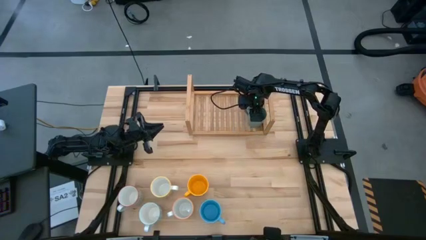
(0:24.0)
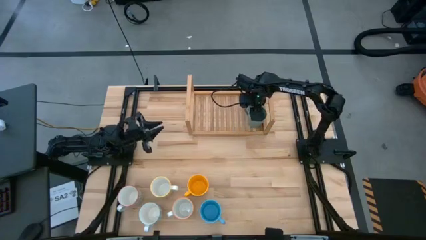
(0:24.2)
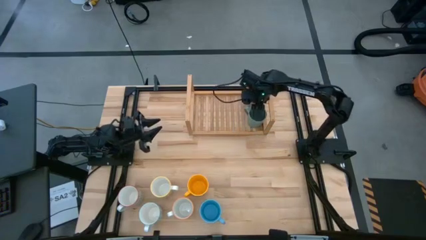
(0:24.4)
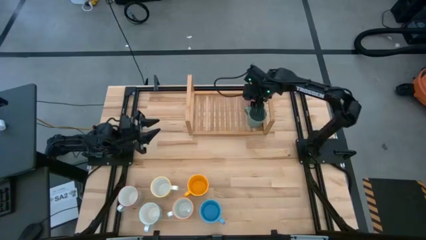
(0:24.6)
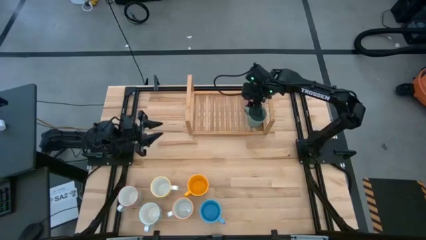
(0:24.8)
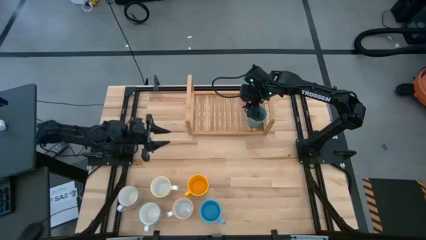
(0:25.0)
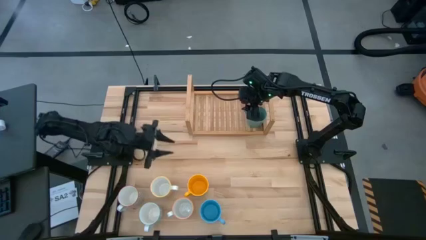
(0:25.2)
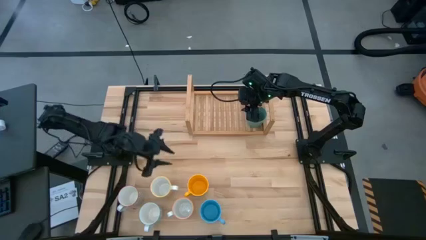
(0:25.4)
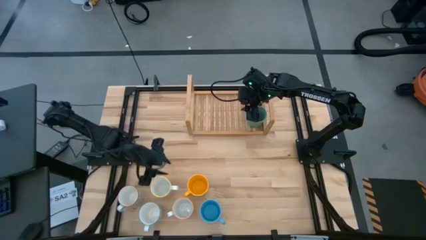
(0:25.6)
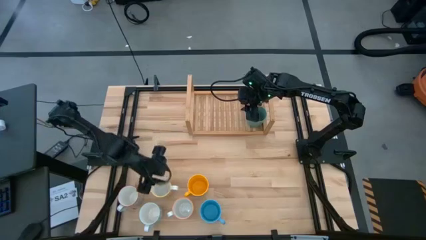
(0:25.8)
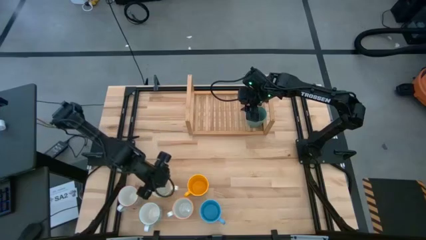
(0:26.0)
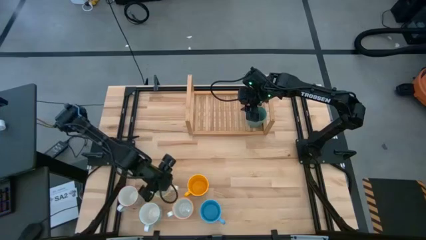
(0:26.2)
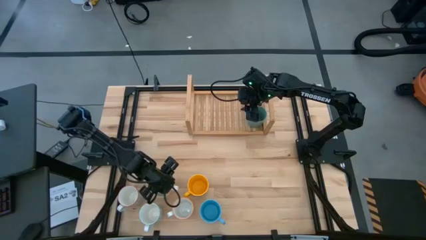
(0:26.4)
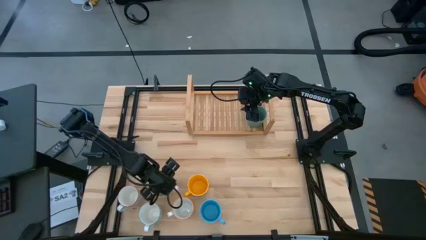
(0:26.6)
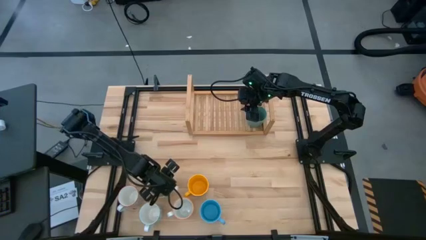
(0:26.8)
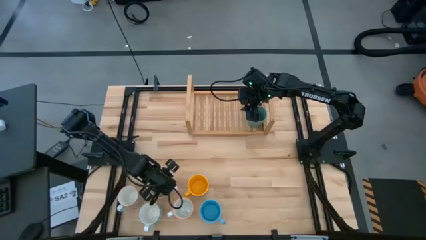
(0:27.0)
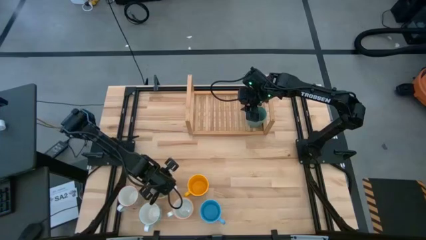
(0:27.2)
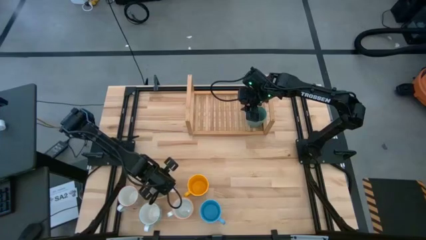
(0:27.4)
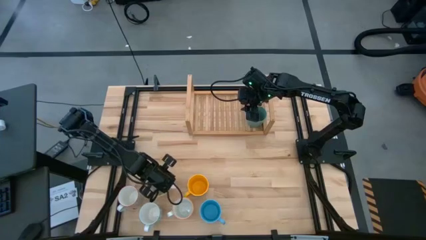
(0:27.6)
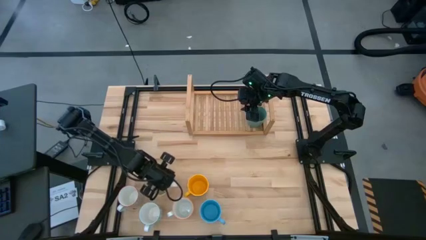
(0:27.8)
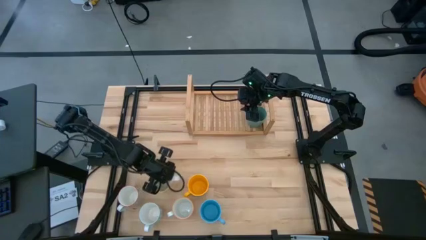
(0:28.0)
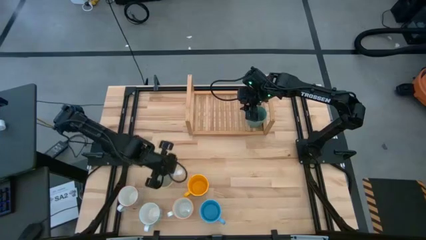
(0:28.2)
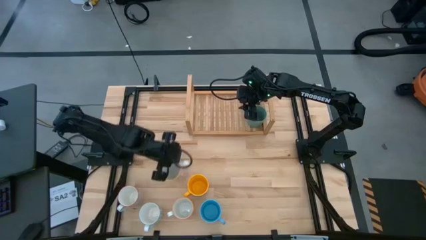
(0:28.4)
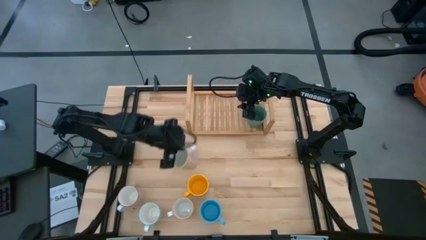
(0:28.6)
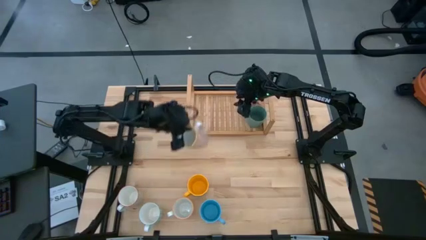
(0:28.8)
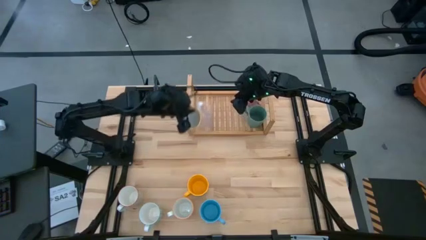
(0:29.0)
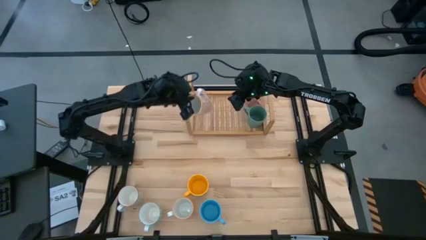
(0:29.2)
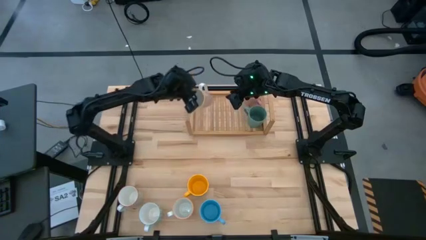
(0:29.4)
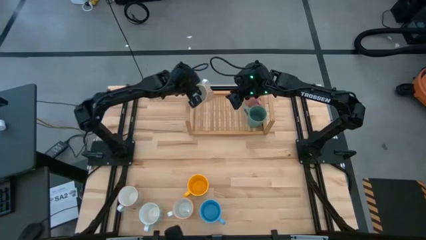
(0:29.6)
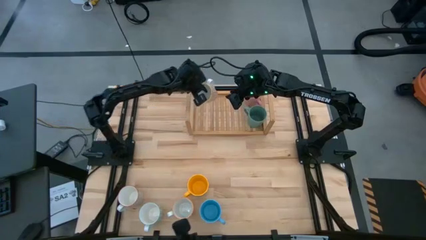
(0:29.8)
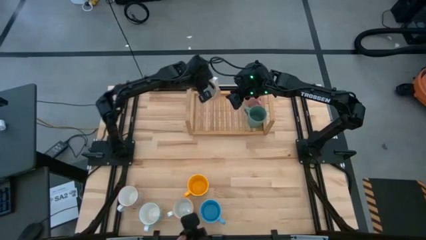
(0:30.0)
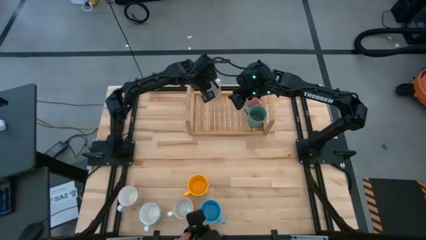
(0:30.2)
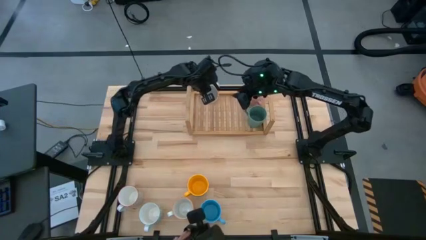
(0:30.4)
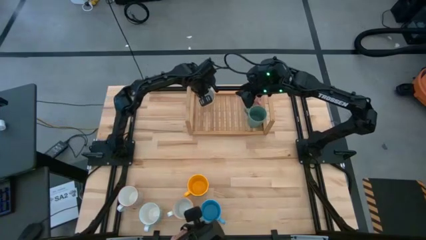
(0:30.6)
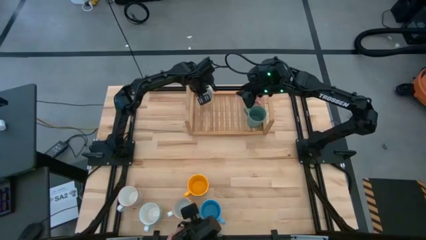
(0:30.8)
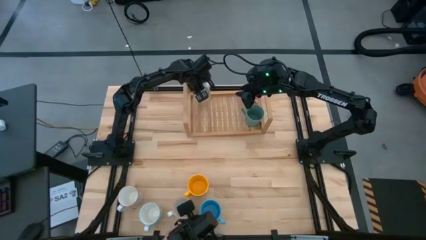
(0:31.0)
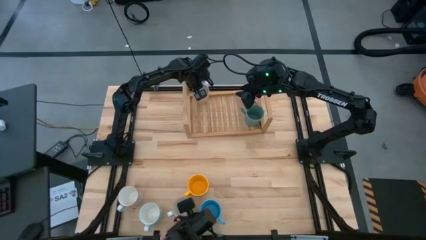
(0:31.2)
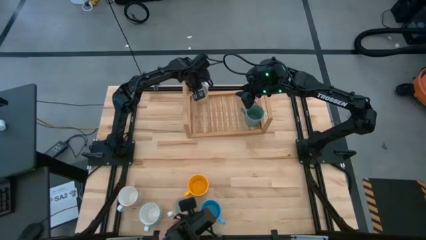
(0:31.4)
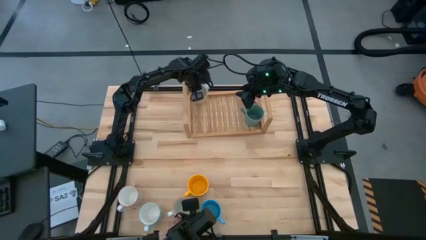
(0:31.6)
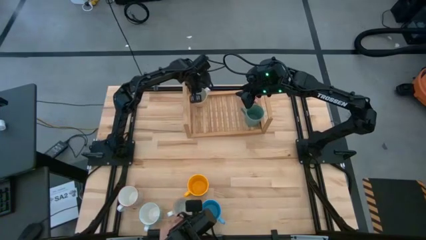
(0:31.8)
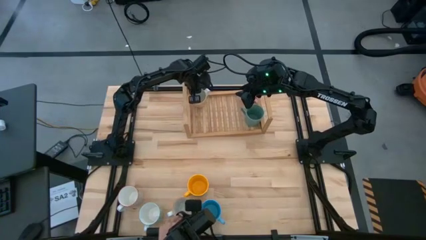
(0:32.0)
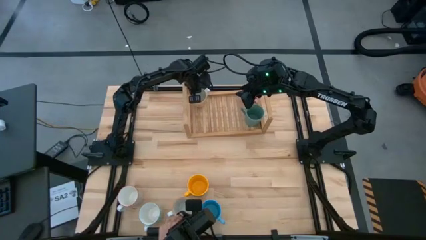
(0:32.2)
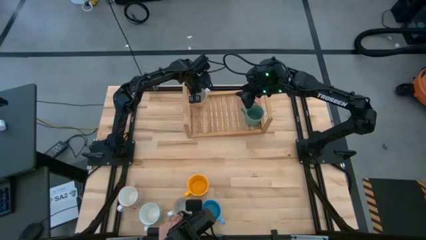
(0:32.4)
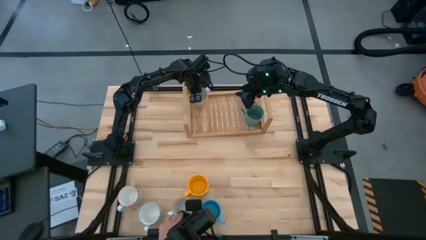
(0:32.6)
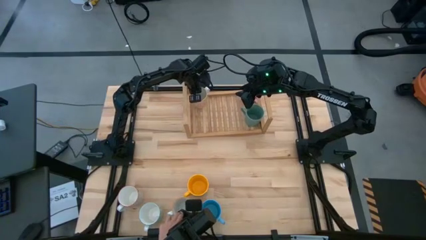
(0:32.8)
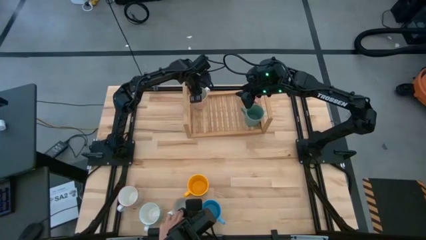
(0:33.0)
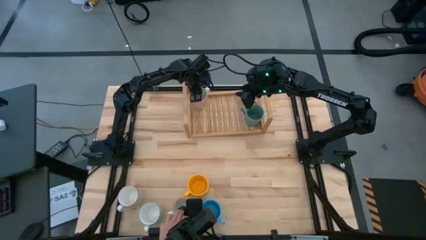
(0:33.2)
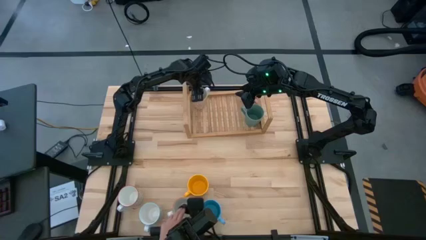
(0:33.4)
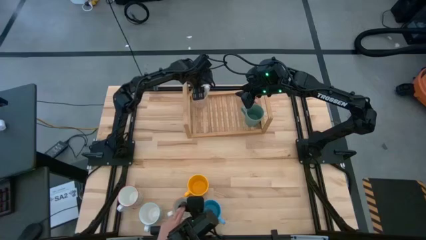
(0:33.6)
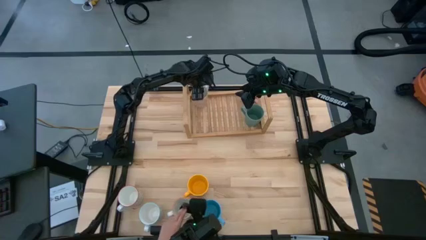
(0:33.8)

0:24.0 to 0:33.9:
Task: Place coffee mugs
Put the orange patterned mug on the shelf

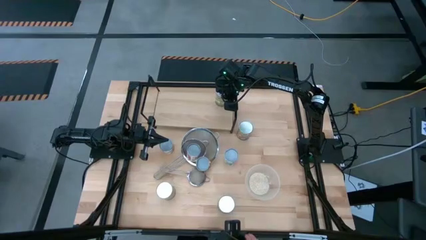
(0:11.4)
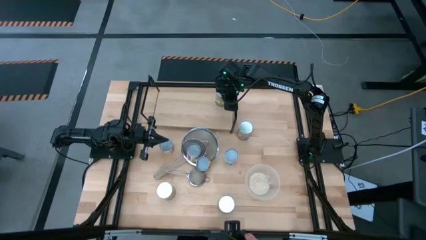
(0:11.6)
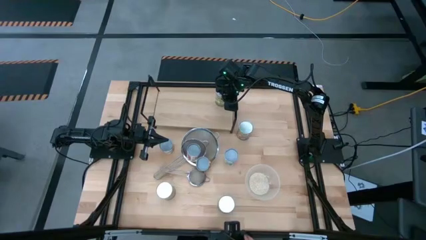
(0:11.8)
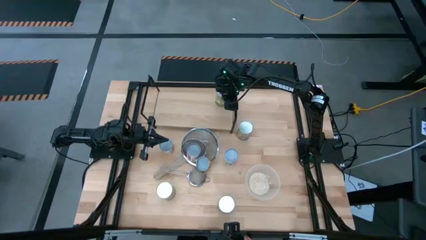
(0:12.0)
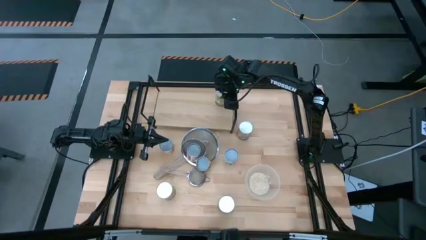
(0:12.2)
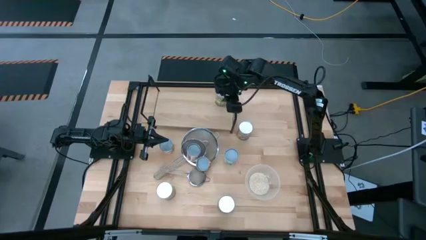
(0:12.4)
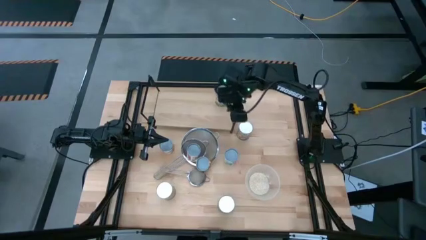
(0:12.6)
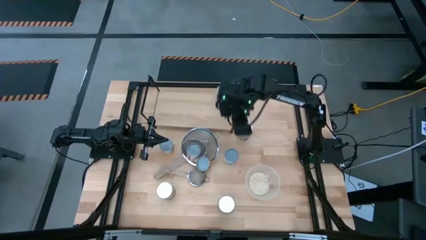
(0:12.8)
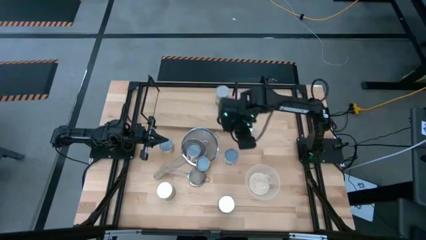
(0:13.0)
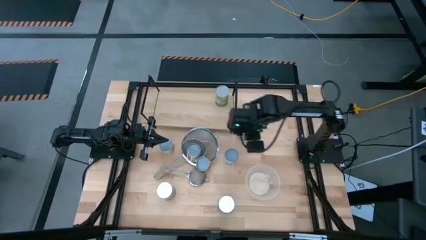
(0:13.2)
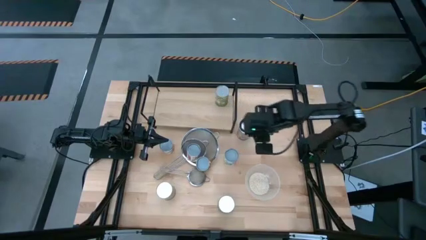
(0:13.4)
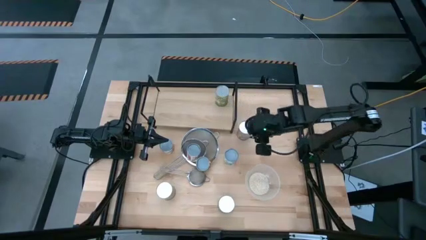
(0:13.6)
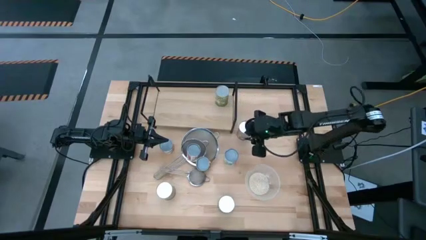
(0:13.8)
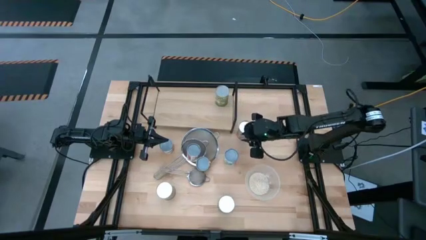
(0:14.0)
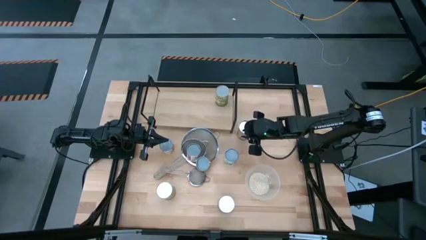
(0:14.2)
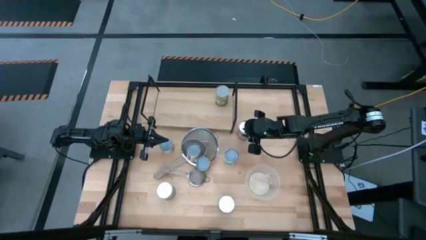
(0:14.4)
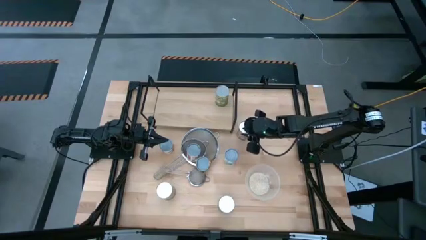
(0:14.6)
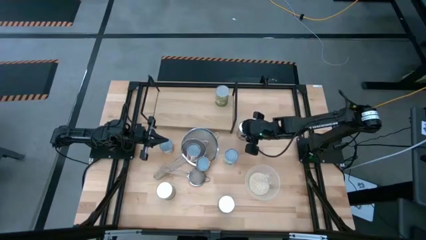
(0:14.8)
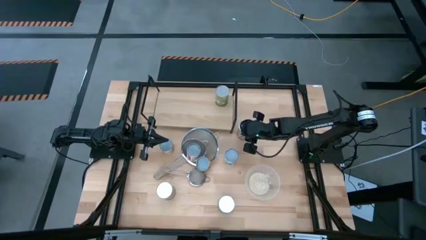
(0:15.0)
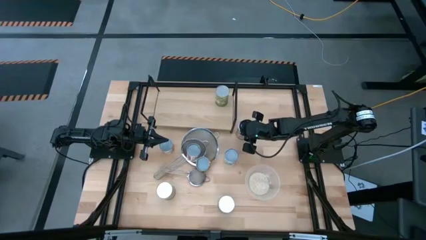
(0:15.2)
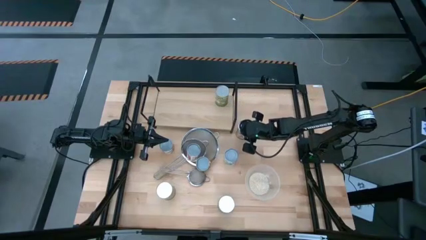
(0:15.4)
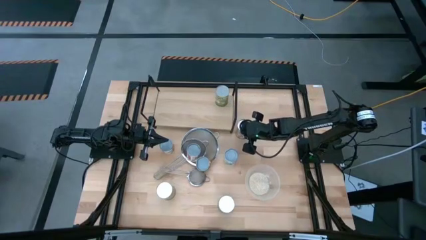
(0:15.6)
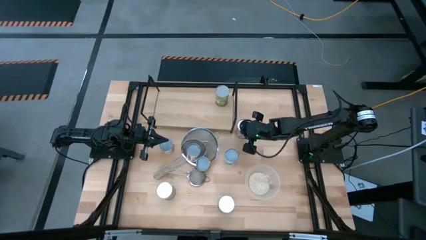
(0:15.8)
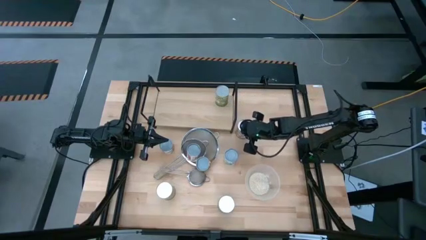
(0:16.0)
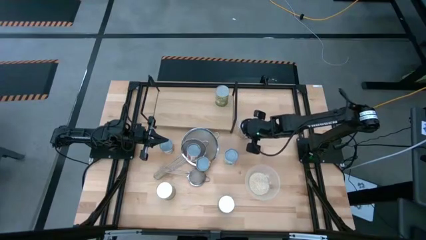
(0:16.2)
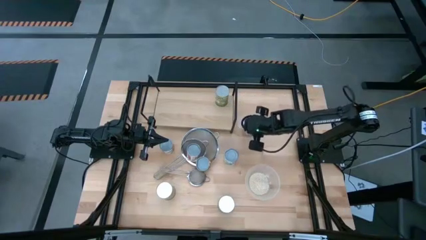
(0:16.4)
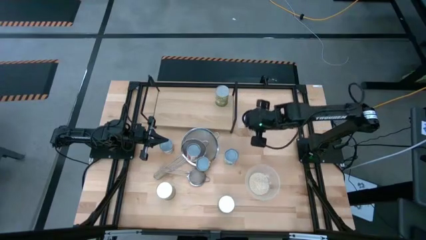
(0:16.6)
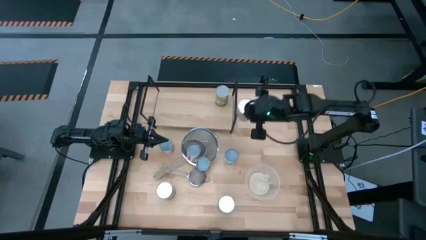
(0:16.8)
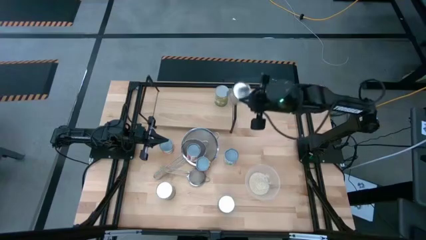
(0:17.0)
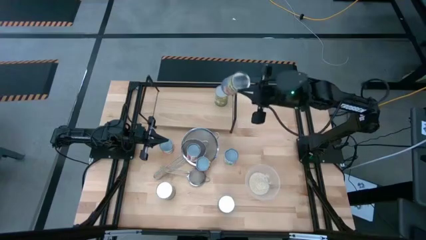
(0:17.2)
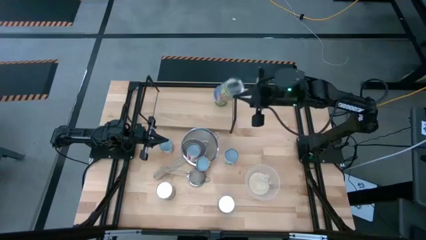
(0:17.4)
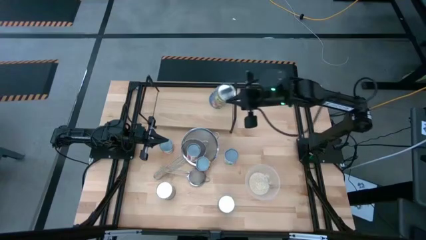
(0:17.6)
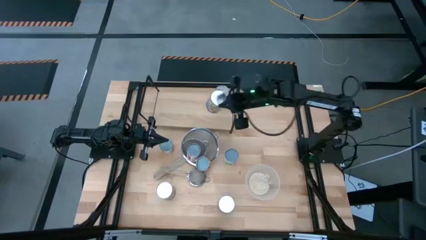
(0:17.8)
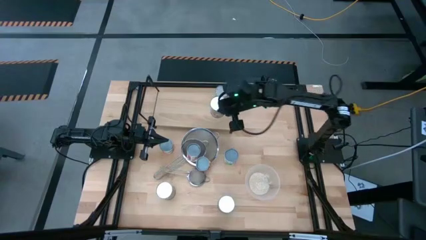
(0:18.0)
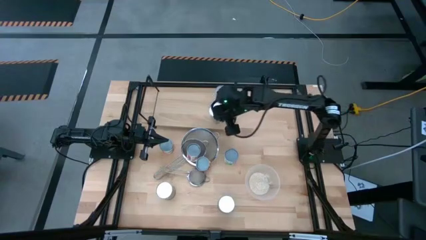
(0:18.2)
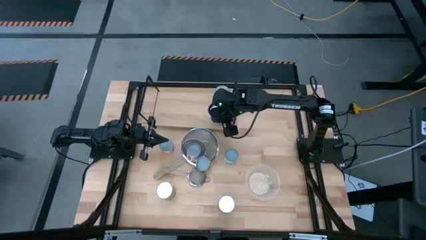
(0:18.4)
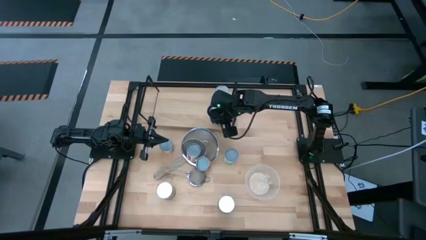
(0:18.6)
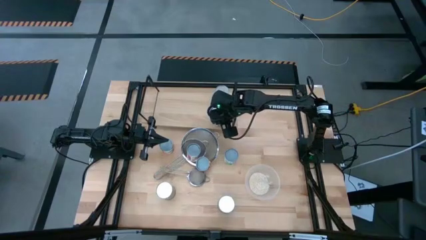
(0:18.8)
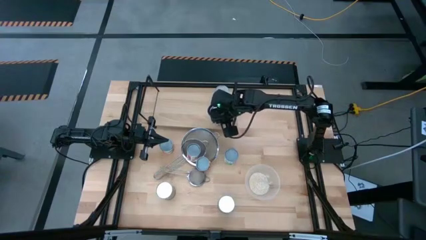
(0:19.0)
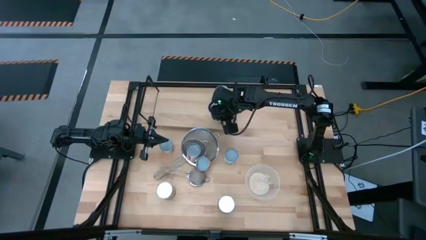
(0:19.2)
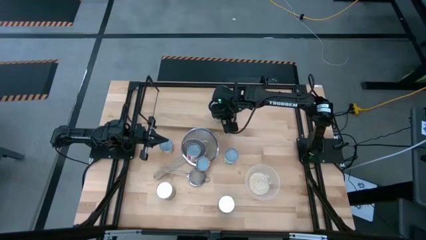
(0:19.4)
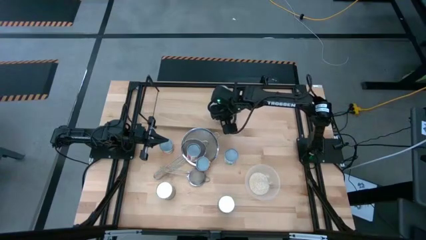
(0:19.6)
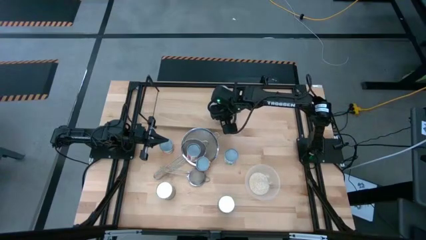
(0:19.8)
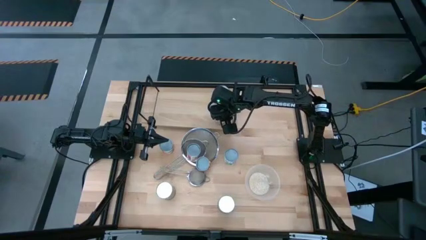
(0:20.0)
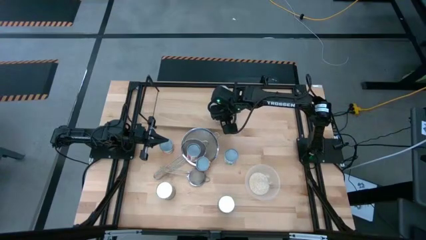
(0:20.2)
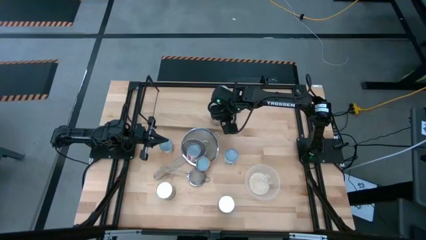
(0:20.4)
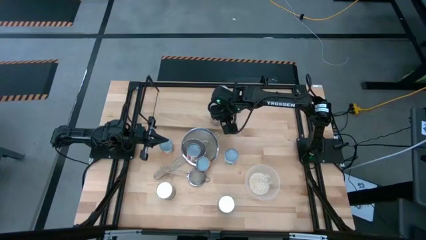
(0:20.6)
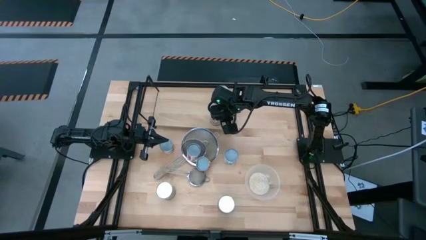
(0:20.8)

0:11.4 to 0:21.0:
Task: Pick and place cans onto a shelf
Put the canned peaches on the shelf
